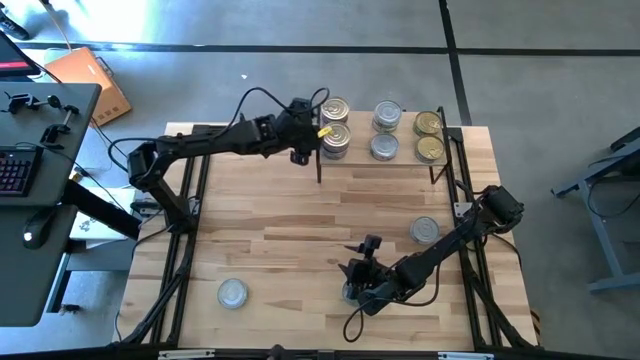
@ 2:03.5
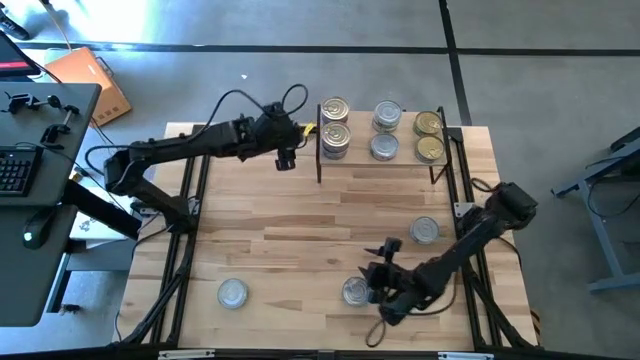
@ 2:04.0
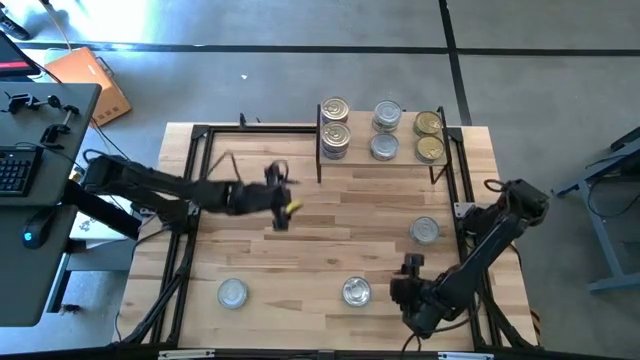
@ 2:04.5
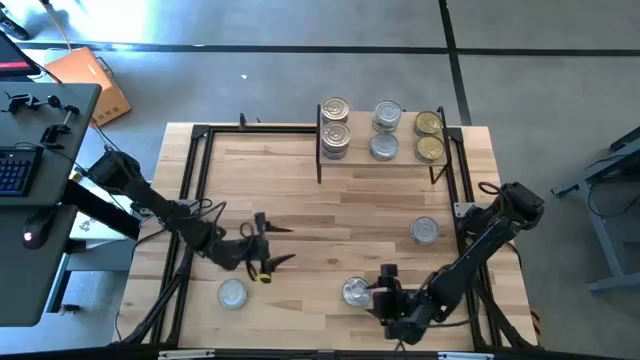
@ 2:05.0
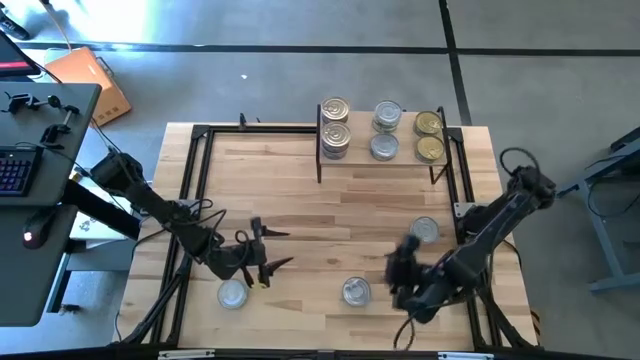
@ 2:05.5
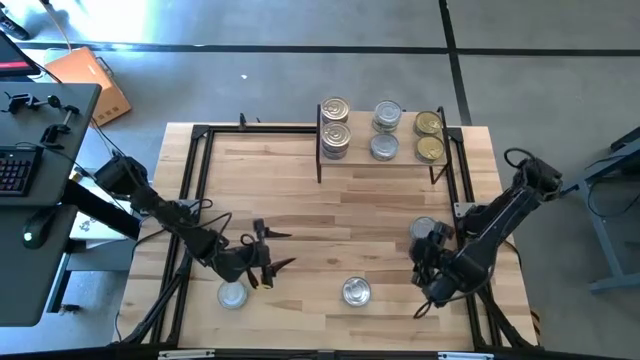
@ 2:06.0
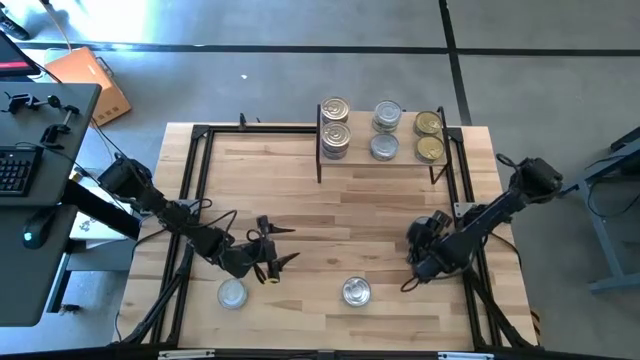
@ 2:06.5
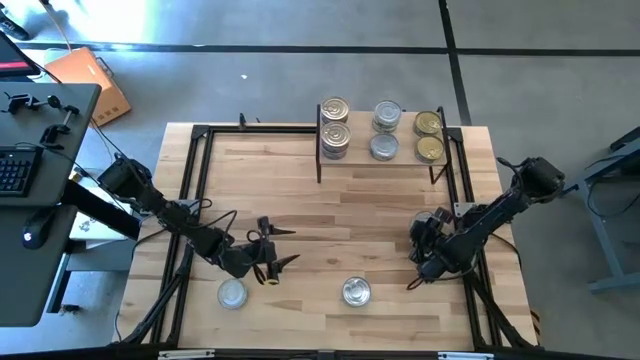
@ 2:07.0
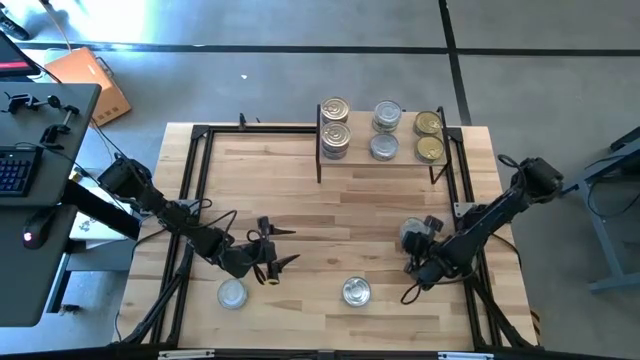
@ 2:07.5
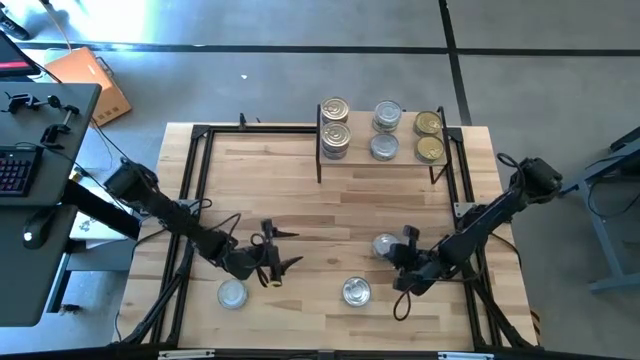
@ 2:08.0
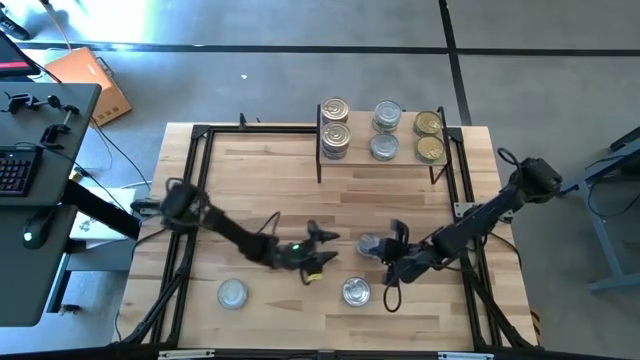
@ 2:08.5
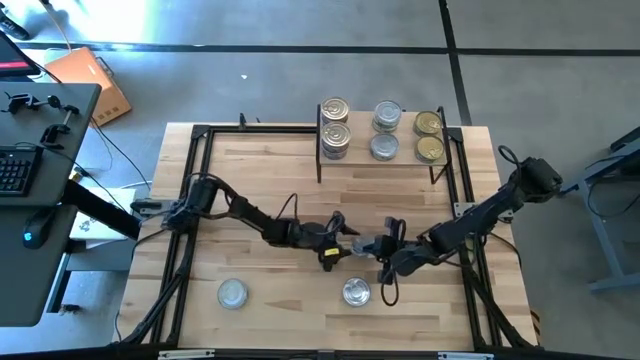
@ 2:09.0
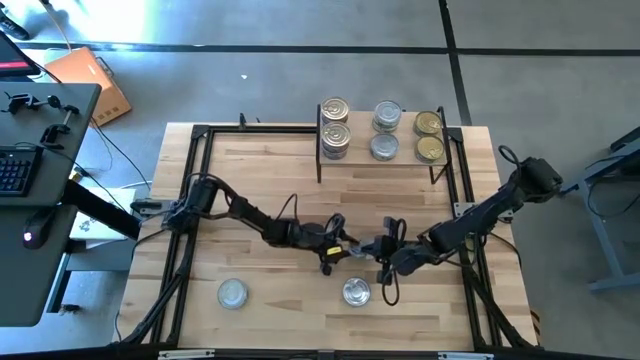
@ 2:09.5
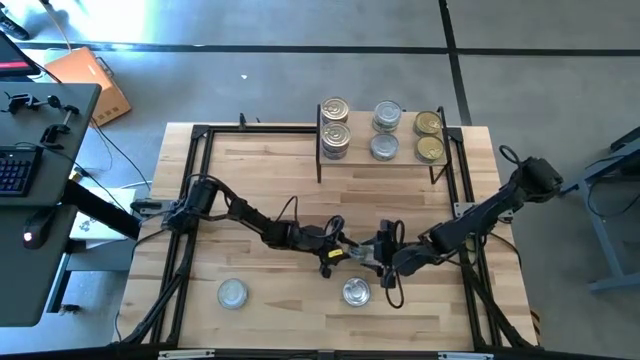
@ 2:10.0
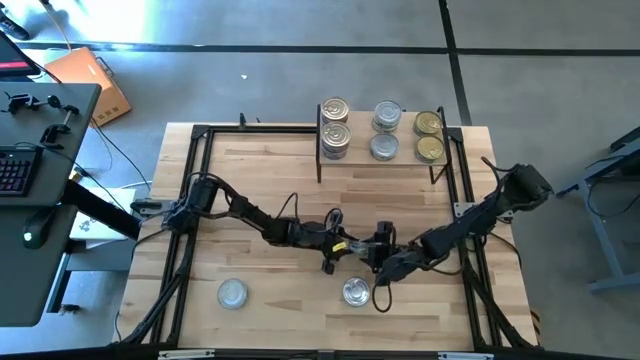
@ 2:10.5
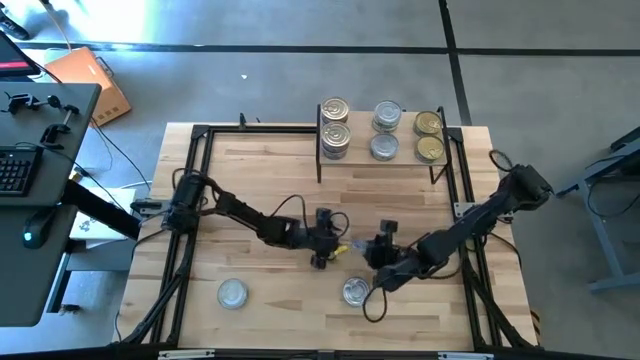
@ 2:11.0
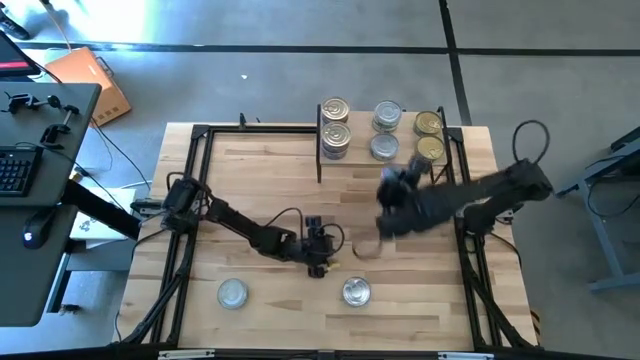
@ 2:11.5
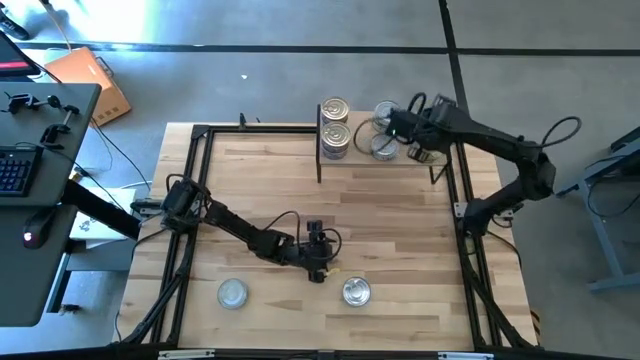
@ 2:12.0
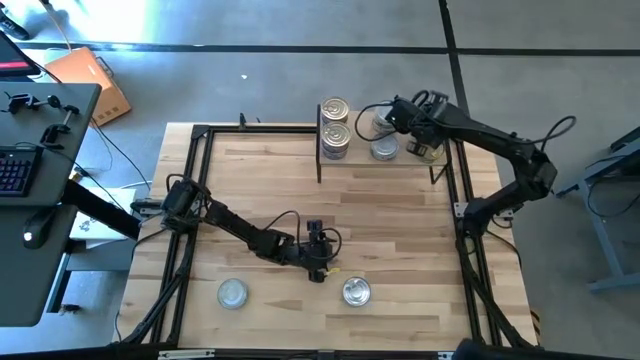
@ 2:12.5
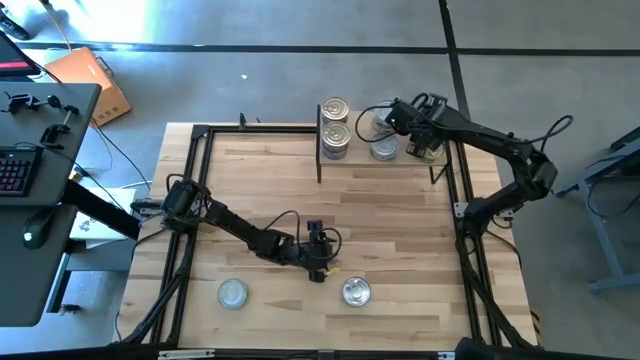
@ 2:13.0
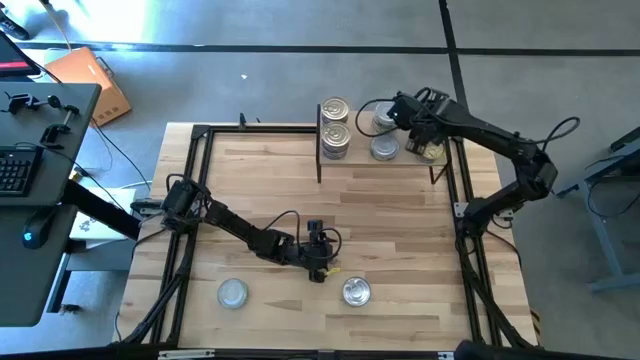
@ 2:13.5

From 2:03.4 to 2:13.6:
Task: Stack canned seafood by type on shelf
Stack the green tuna can on top of the other green tuna can on the shelf

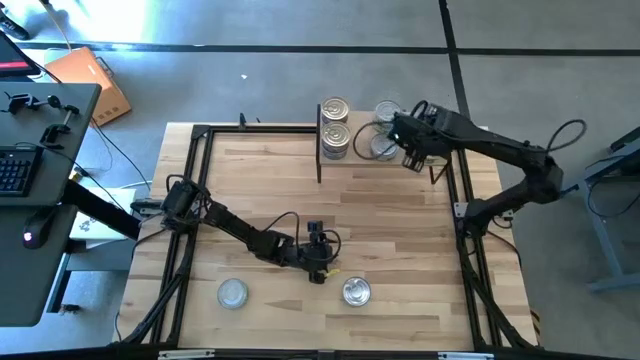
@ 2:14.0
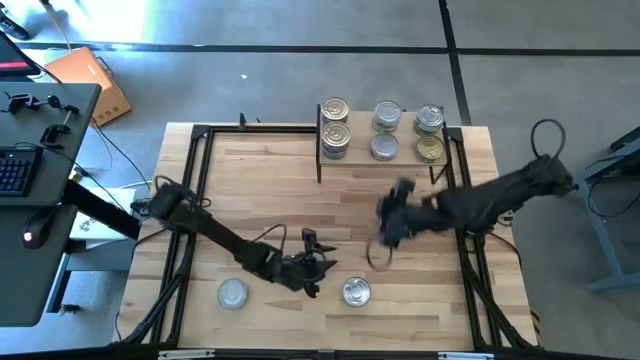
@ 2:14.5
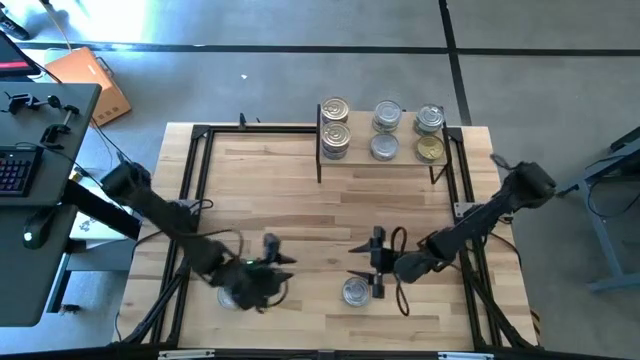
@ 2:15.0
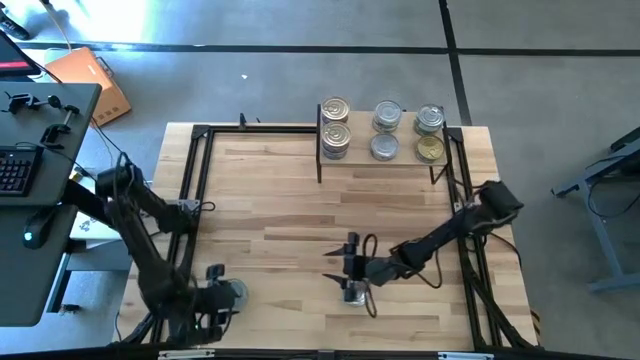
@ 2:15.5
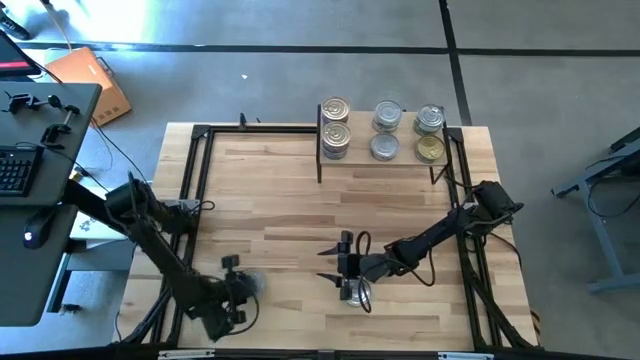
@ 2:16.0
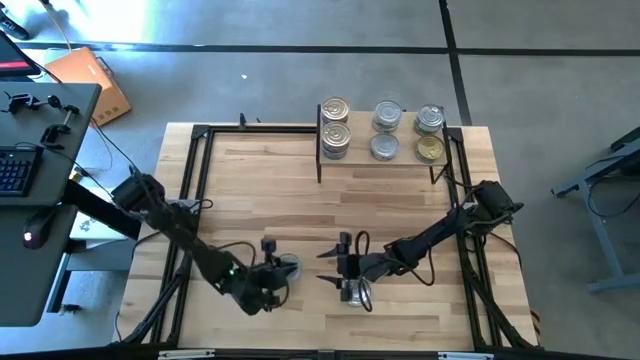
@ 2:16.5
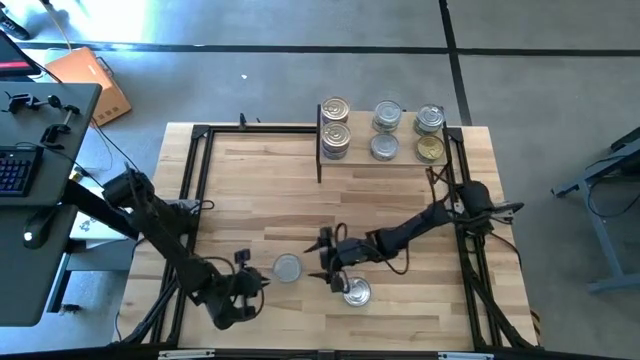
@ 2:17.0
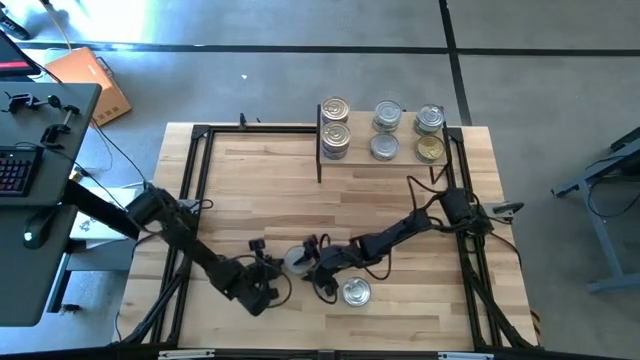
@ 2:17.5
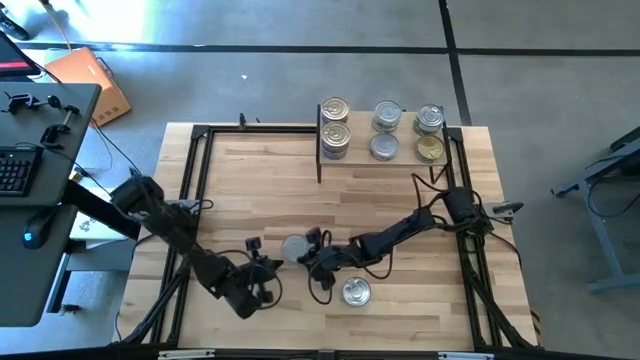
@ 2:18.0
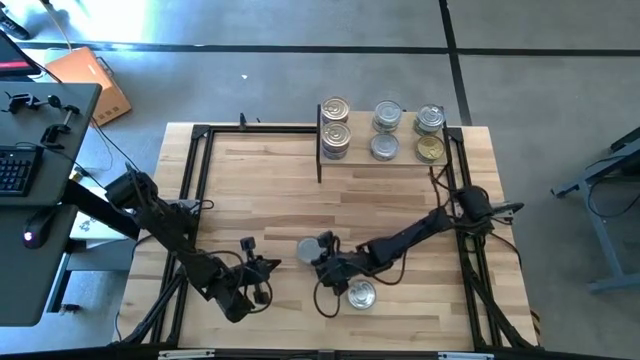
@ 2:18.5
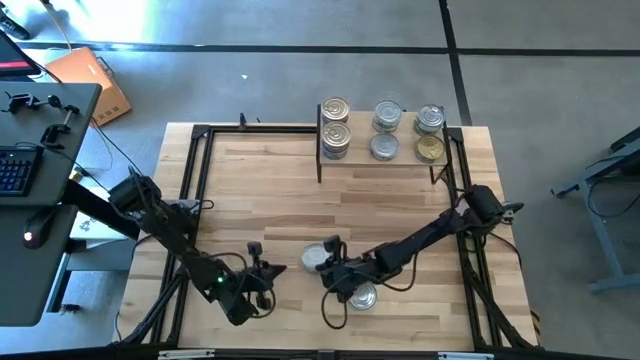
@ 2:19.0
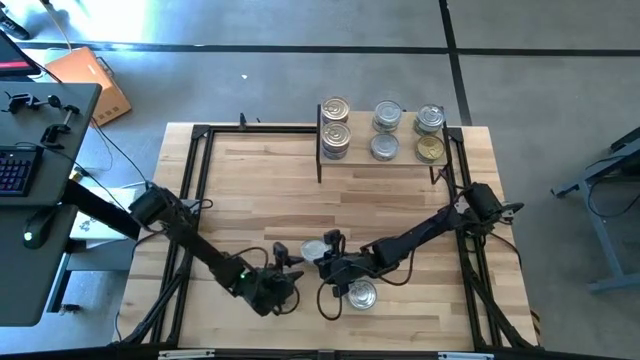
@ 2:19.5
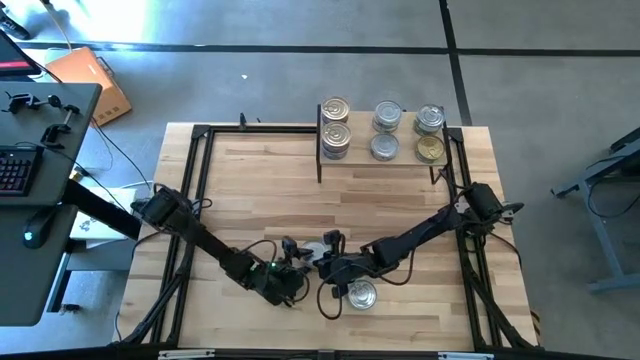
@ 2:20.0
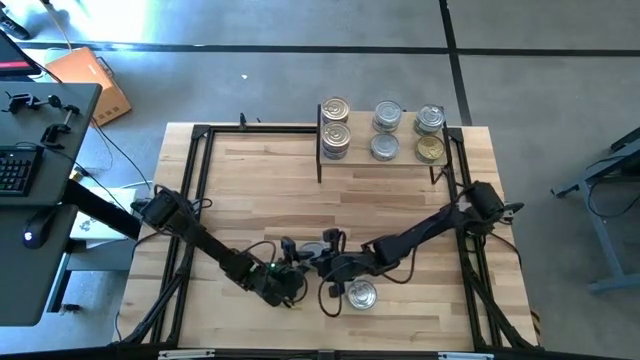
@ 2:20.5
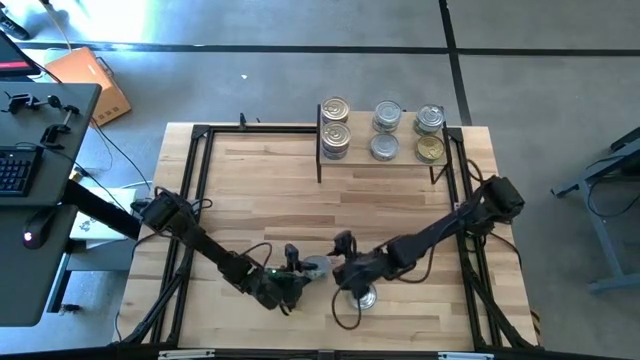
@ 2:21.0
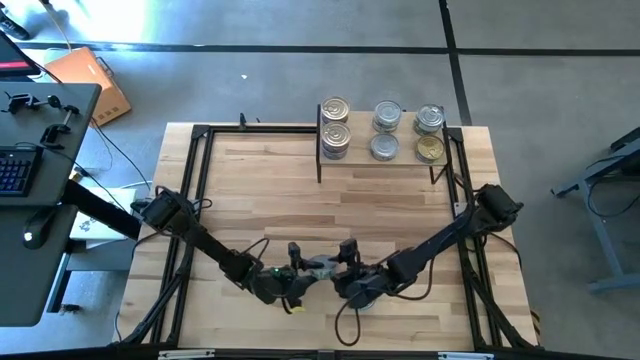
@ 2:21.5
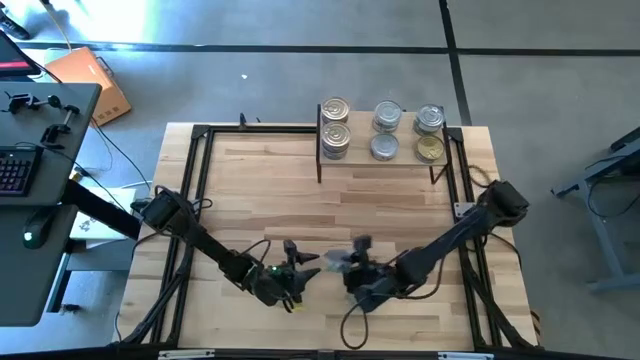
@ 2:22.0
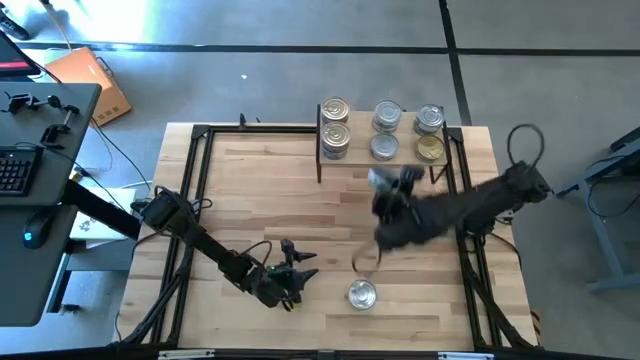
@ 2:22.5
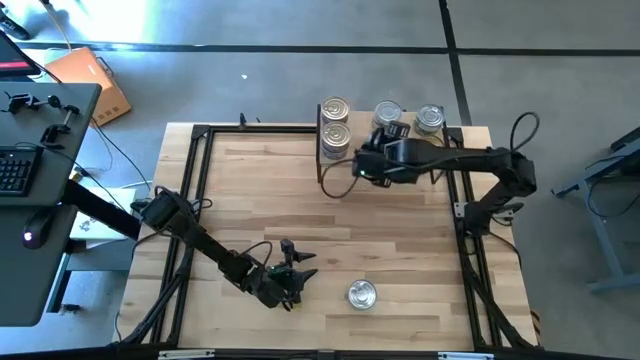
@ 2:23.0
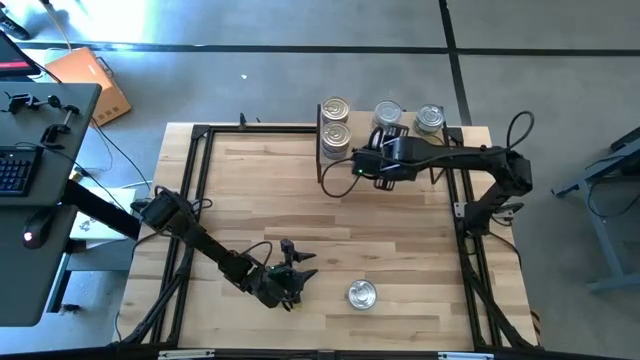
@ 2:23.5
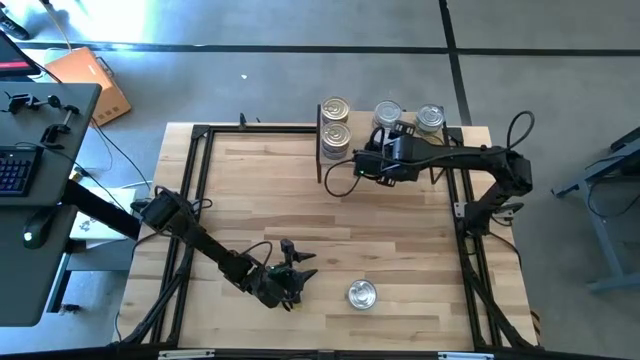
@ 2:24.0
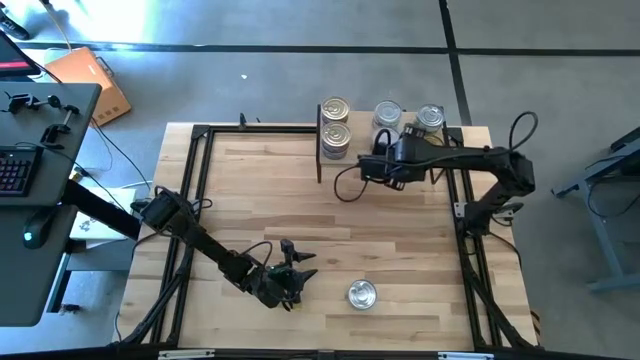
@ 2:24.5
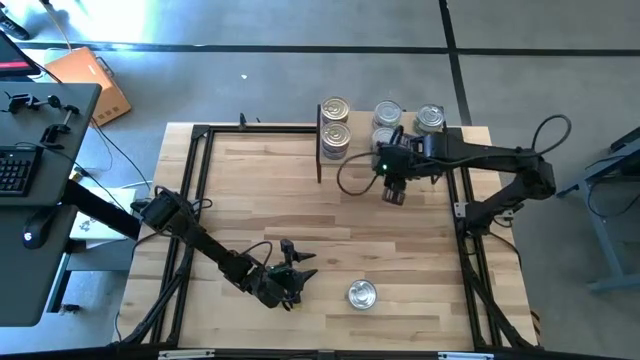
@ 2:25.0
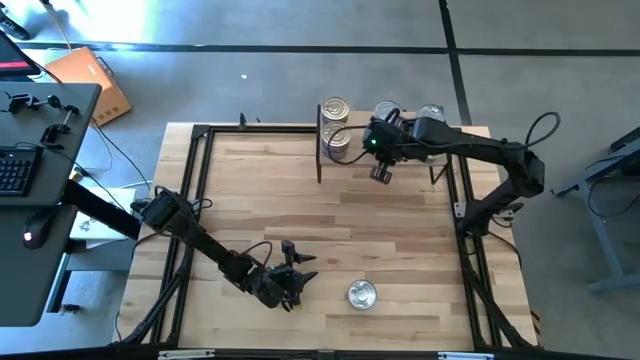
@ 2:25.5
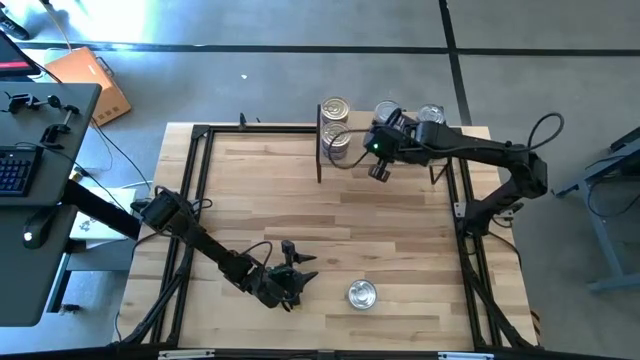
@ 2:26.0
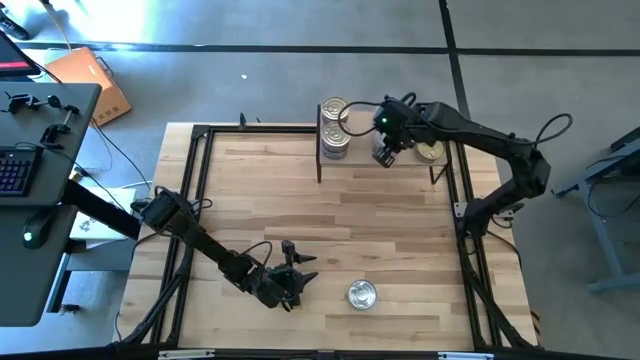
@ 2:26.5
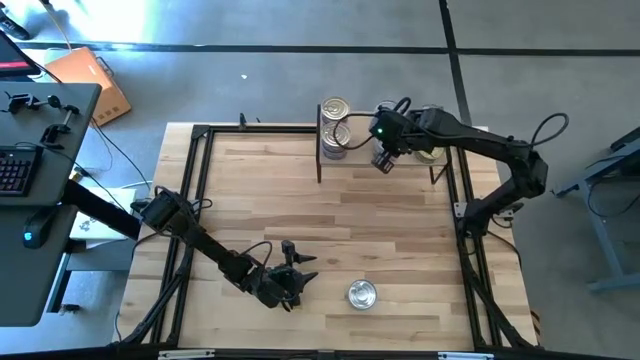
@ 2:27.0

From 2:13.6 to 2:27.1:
Stack the green white tuna can on top of the other green white tuna can on the shelf
